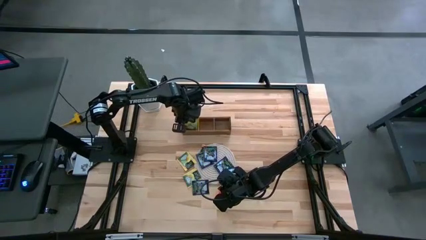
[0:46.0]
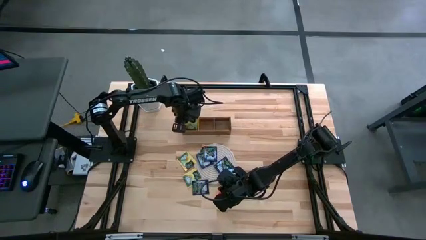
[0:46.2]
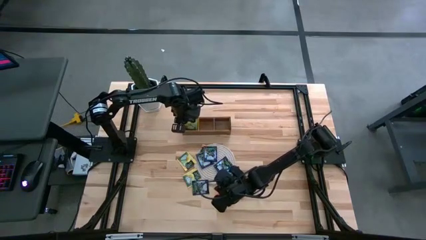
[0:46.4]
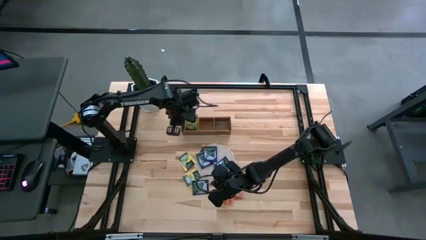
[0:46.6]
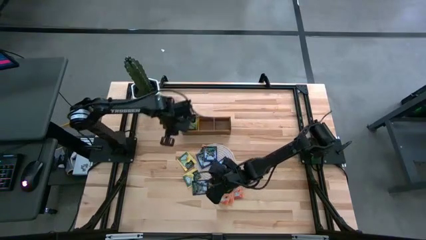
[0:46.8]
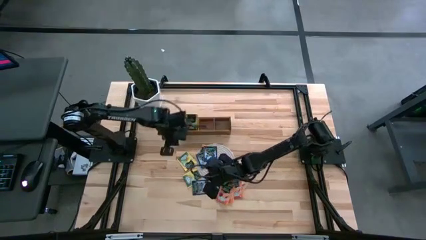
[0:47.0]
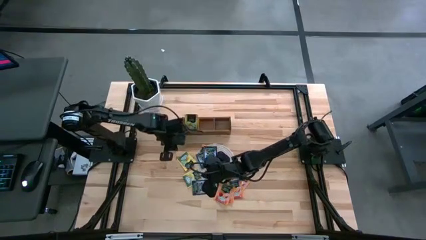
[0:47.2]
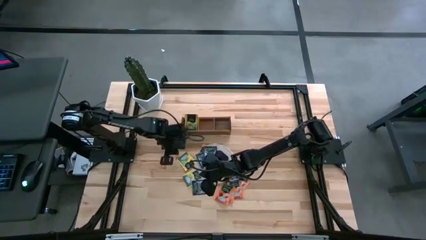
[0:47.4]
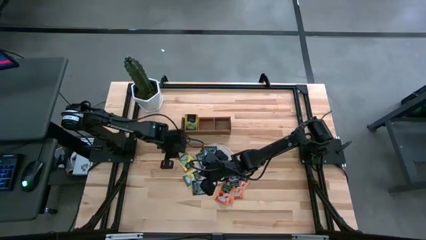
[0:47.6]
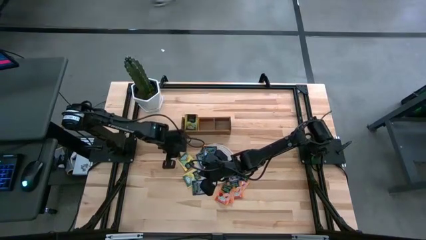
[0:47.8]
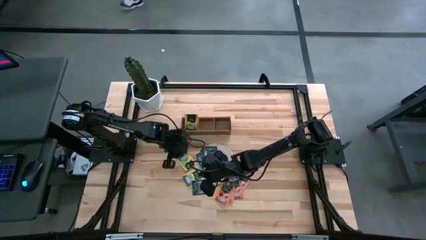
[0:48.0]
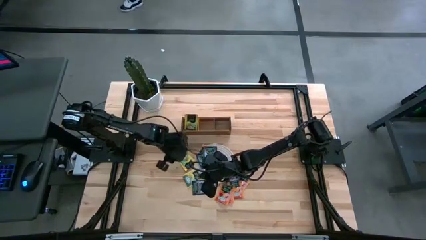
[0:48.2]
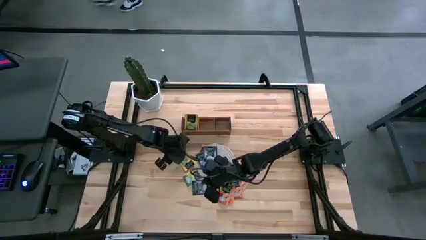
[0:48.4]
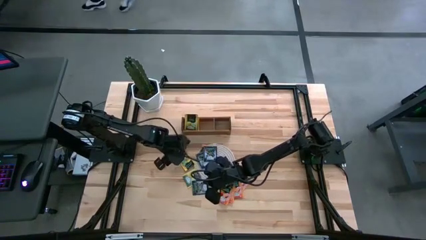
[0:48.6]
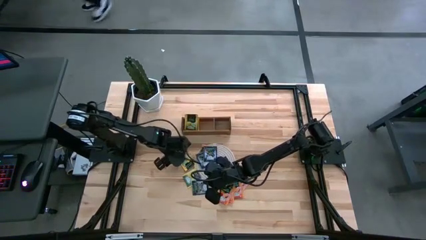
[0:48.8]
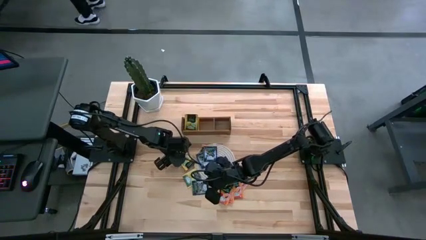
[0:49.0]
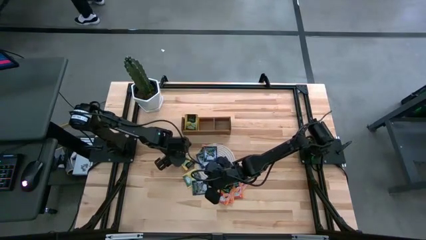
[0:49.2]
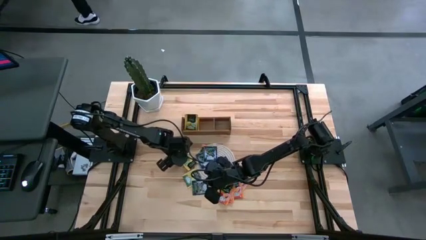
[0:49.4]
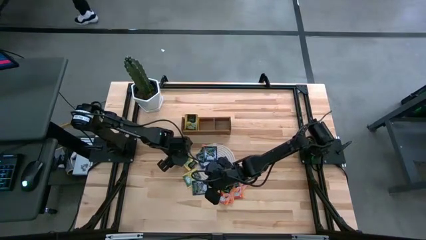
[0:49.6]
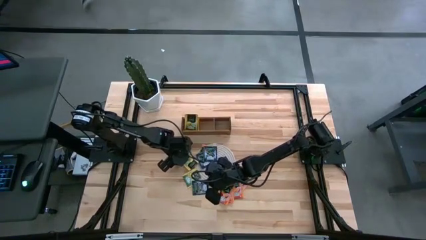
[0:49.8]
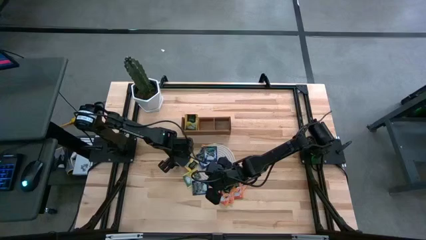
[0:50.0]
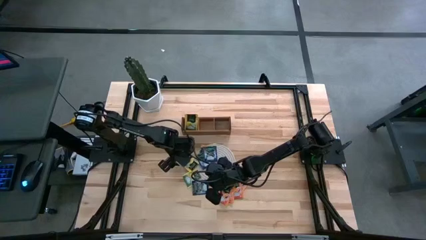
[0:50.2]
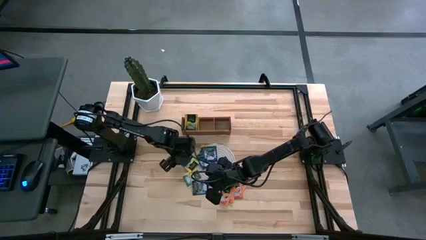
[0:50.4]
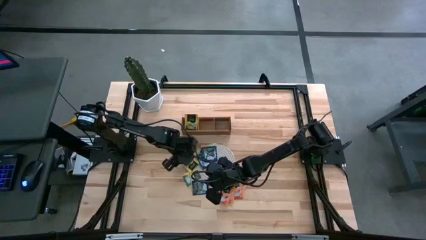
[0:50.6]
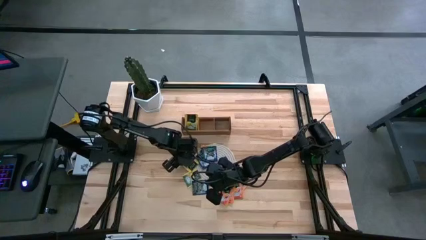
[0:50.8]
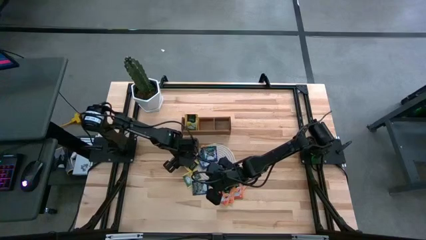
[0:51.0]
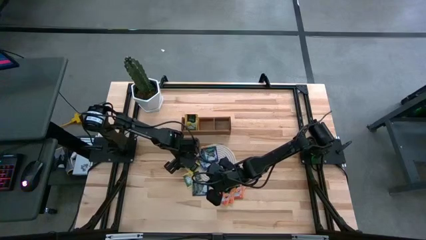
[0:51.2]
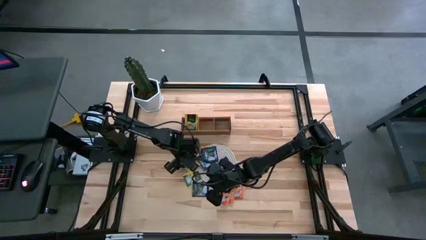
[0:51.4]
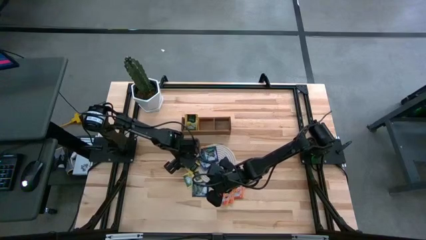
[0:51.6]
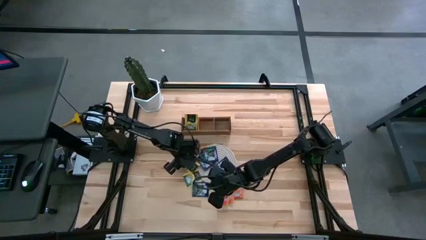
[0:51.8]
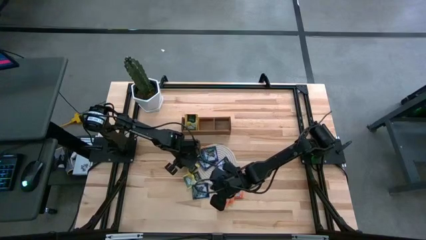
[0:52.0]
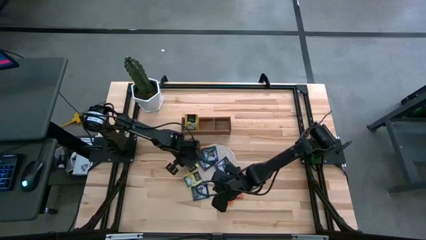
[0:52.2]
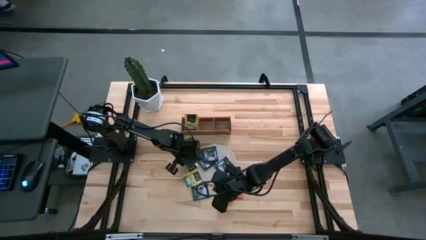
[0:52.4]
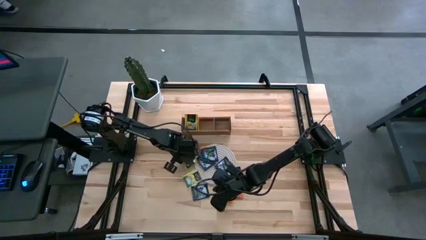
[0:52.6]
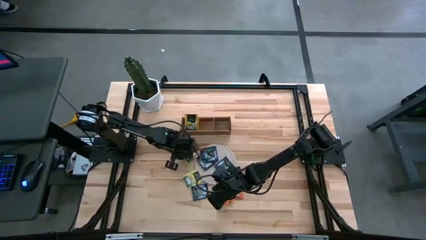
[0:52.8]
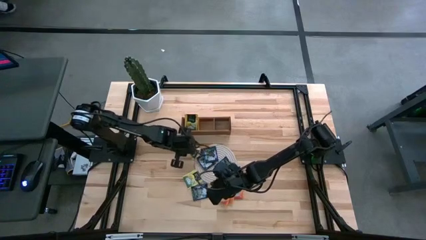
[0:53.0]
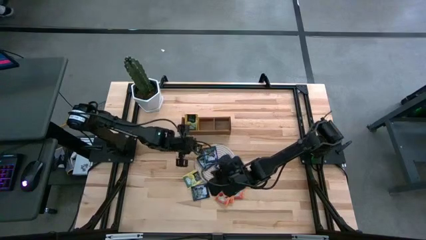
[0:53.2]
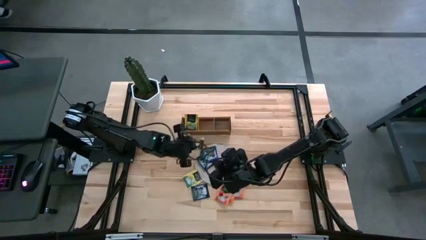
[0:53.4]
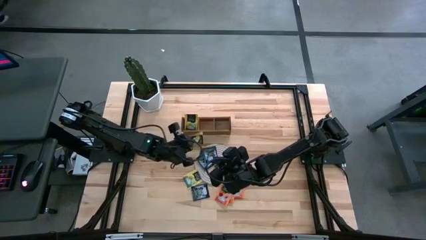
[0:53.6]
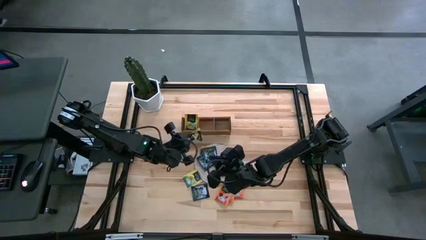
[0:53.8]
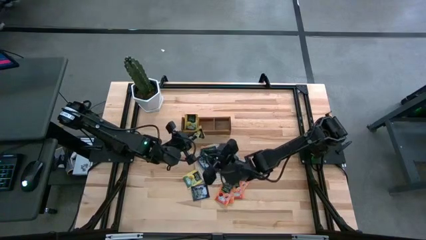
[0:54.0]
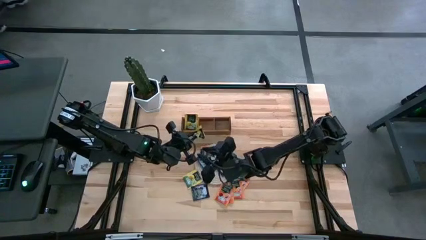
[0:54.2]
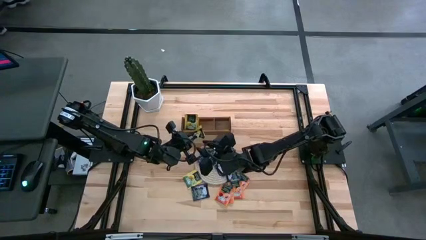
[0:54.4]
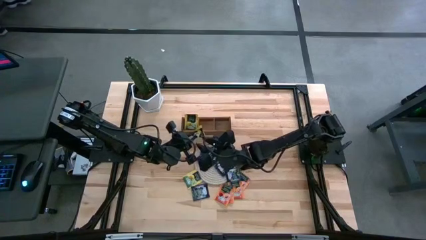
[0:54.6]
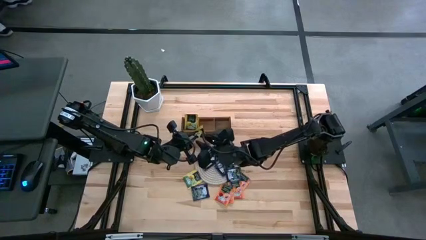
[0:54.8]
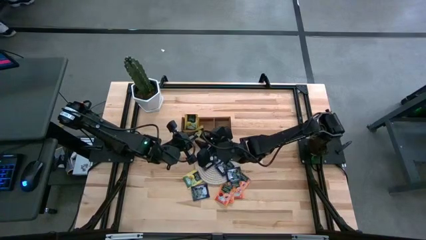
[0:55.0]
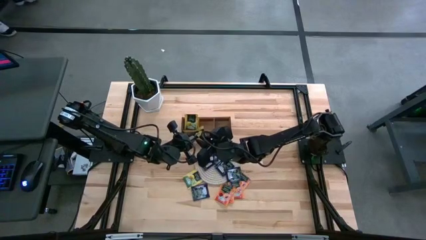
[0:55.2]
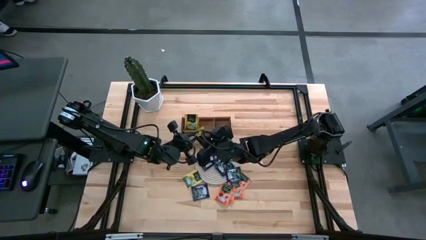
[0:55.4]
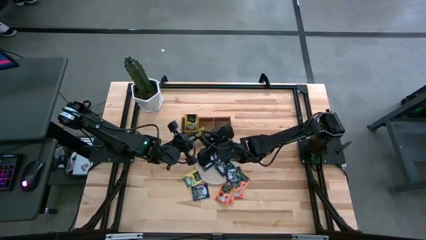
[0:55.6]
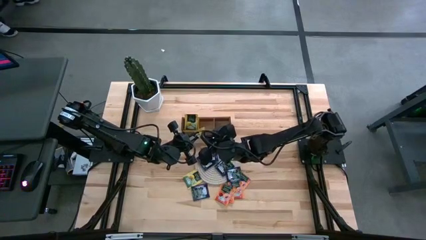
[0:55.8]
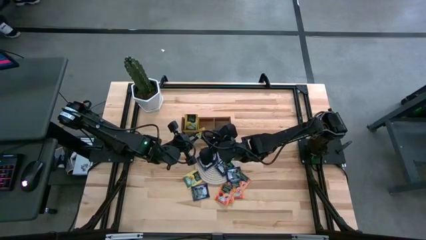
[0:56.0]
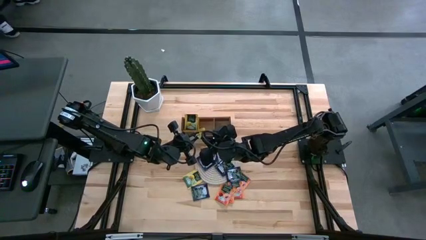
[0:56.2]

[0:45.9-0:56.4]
Task: Pick & Place Tea
Put the yellow tea bag into the left section of the wooden organizer

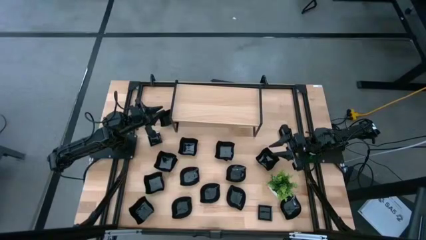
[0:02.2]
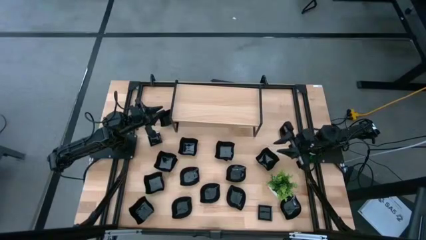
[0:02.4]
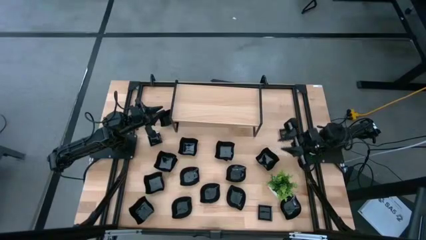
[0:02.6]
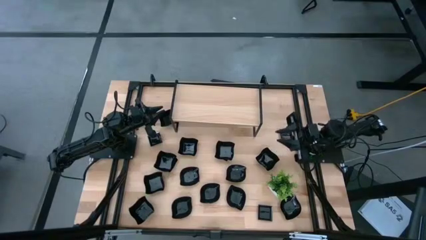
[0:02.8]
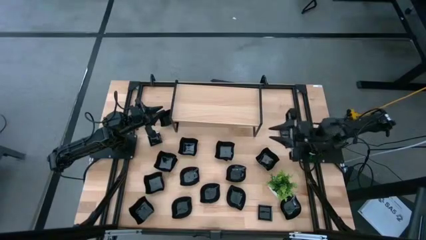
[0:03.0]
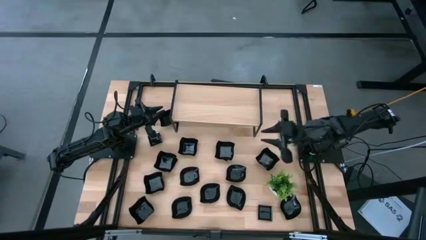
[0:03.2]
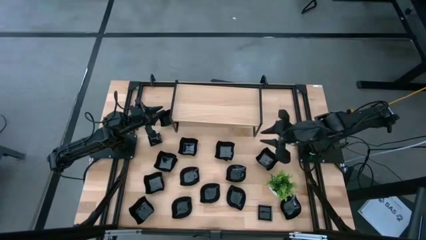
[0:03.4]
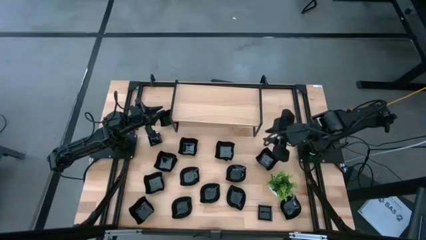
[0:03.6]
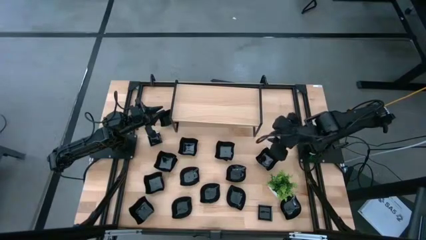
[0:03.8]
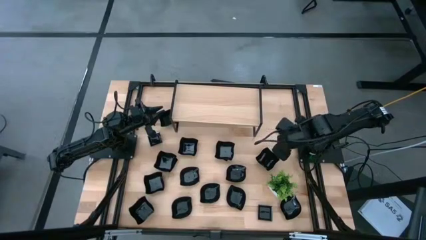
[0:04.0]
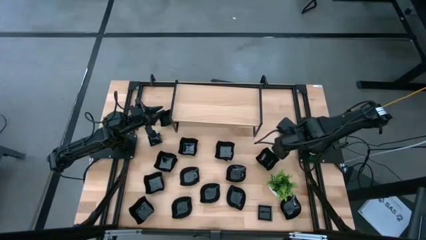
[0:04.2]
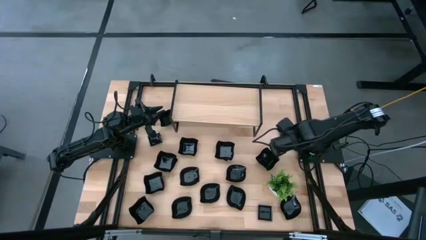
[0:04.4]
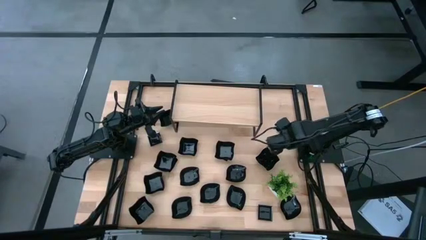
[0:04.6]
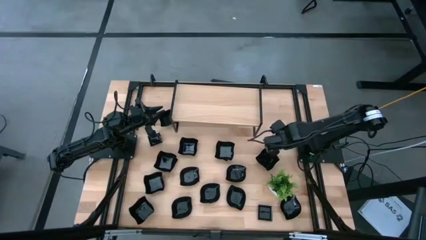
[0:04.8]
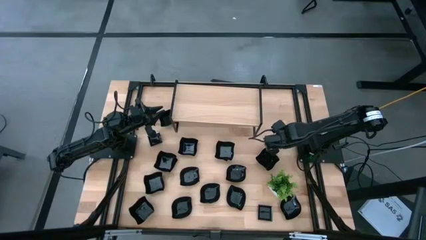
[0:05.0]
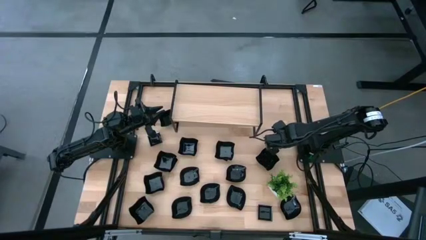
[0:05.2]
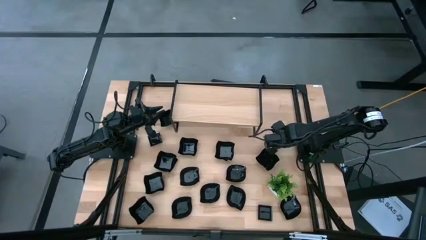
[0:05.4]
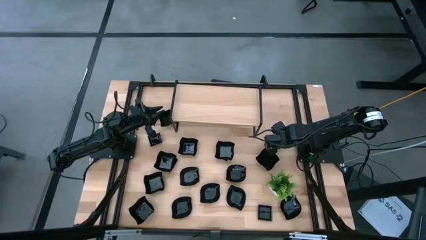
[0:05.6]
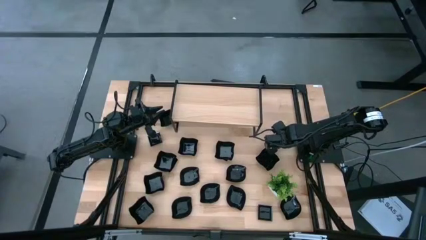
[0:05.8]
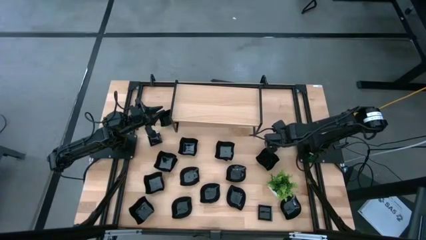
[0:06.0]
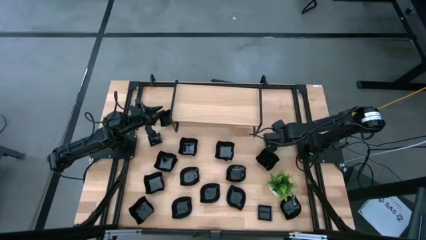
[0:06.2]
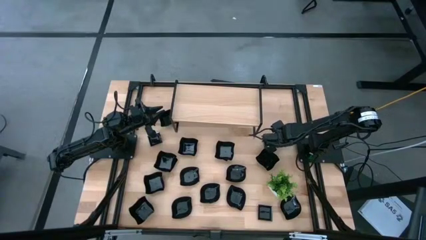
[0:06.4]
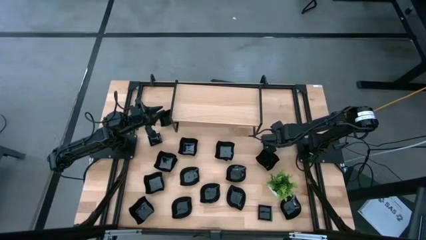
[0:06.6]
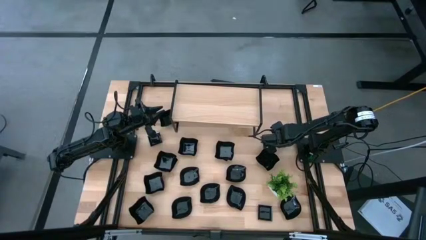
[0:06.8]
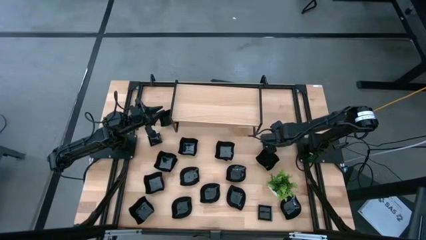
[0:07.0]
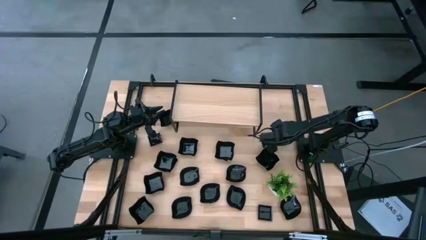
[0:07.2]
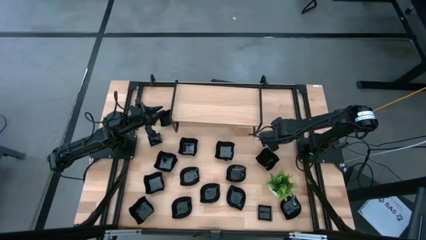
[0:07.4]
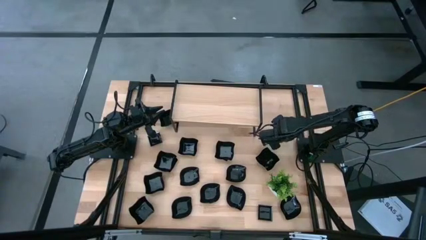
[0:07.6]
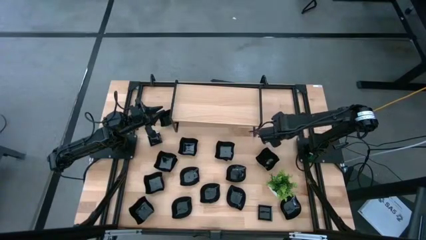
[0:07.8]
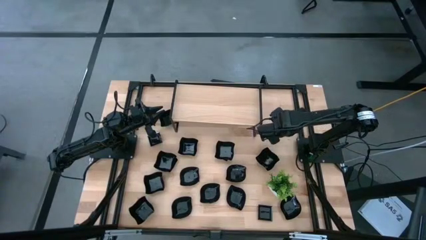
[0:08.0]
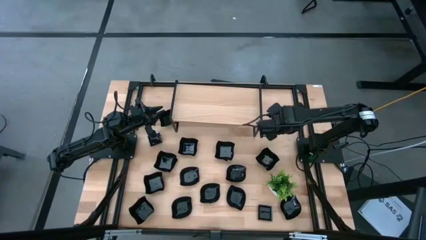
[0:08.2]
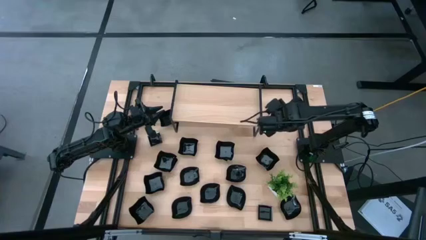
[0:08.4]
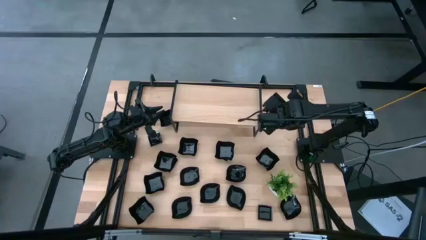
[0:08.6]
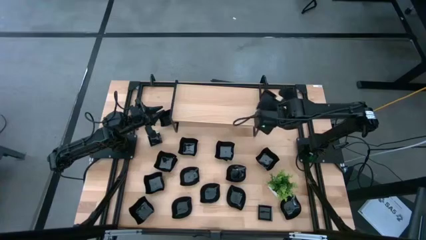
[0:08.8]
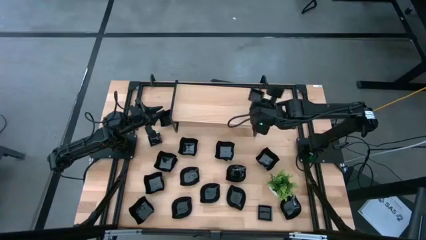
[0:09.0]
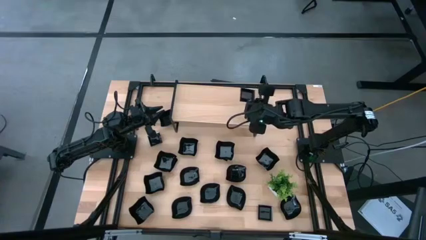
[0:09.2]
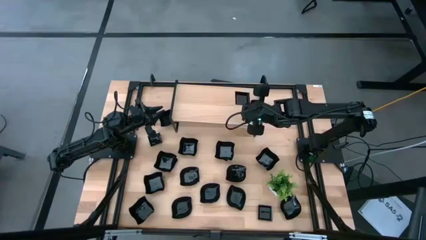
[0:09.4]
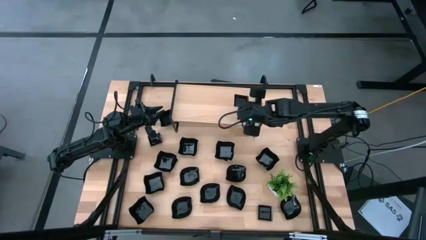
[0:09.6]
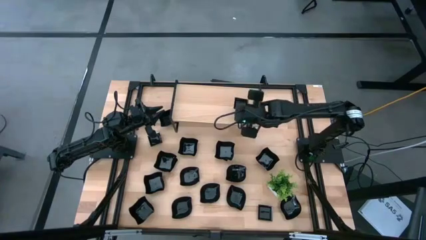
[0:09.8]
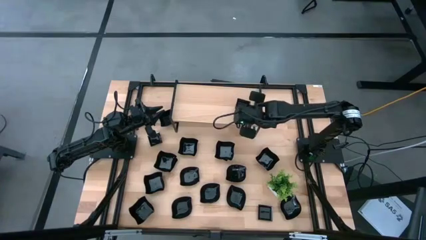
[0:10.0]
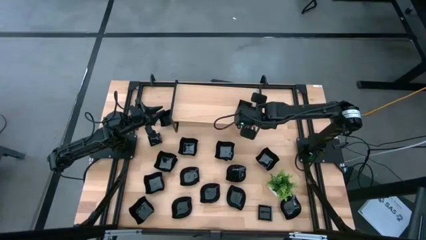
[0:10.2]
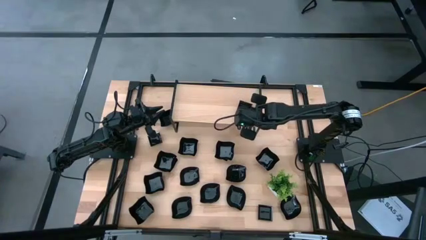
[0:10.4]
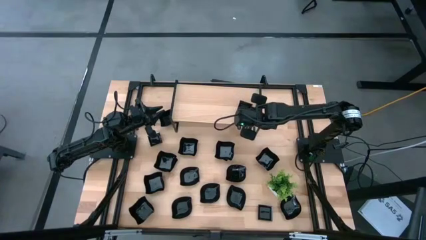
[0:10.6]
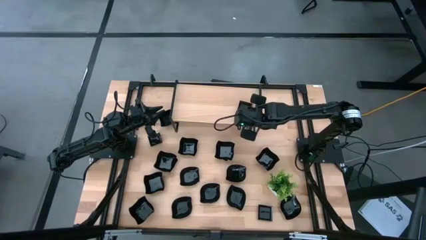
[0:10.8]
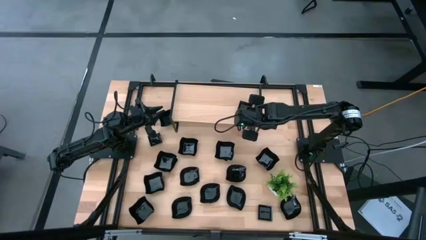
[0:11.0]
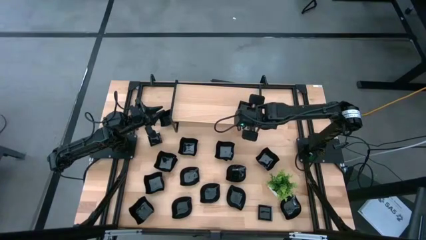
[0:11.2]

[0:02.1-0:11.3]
Task: Pick & Place Mini shaped plates
Put the square plate on the shelf
